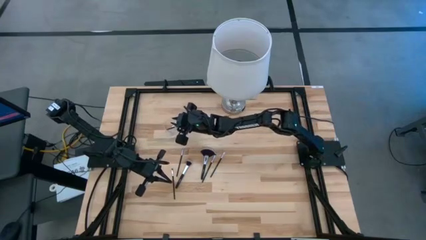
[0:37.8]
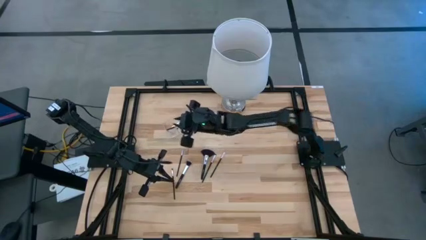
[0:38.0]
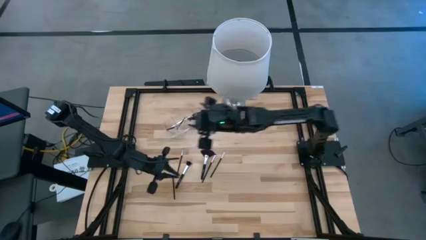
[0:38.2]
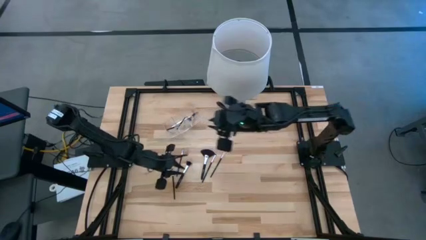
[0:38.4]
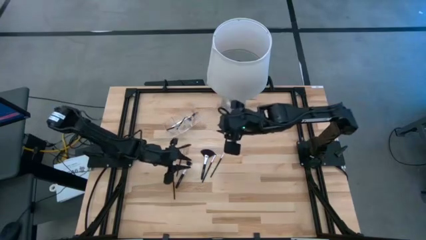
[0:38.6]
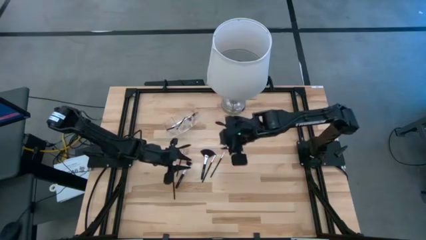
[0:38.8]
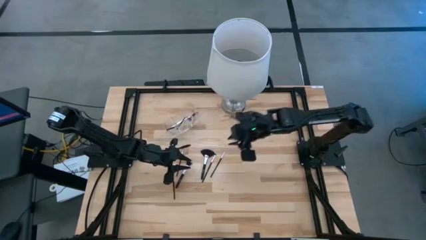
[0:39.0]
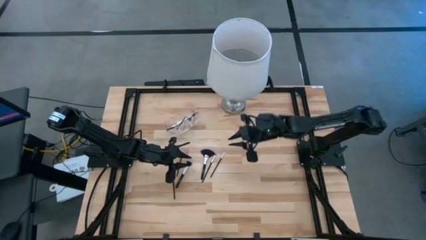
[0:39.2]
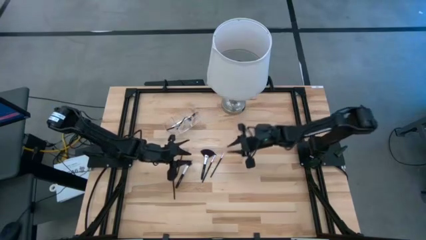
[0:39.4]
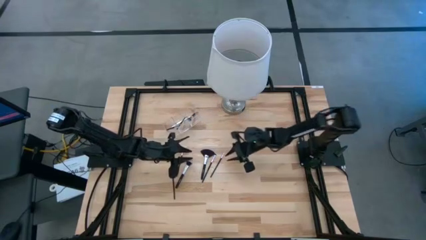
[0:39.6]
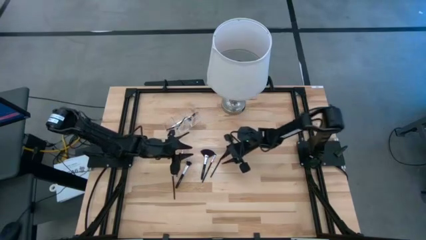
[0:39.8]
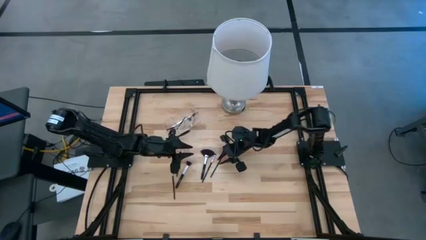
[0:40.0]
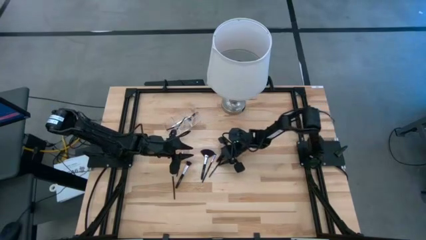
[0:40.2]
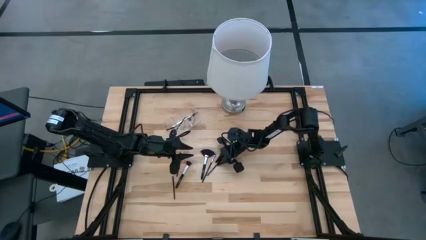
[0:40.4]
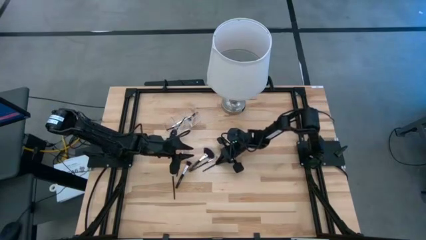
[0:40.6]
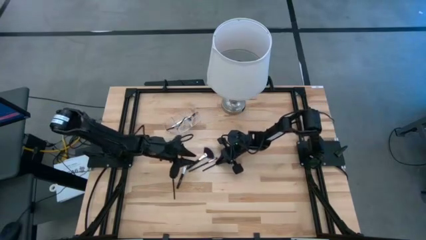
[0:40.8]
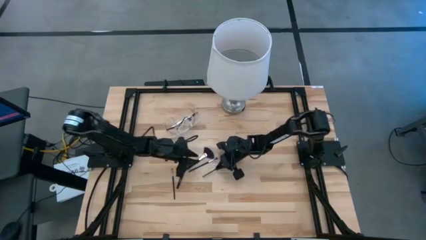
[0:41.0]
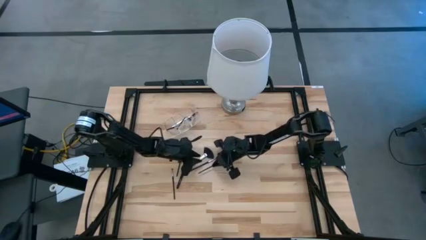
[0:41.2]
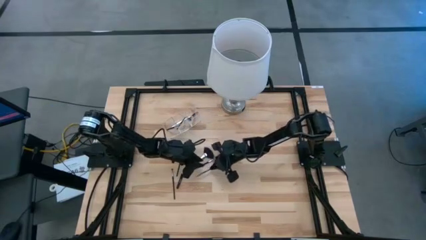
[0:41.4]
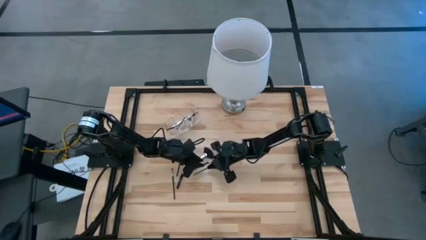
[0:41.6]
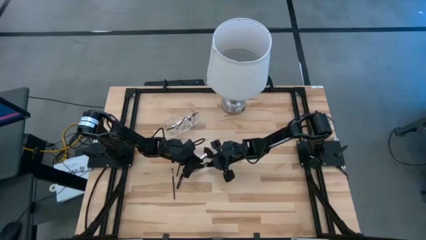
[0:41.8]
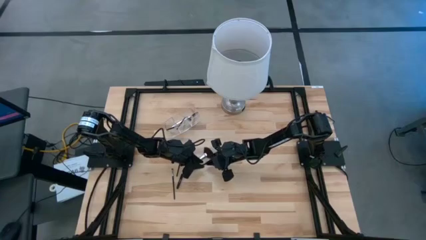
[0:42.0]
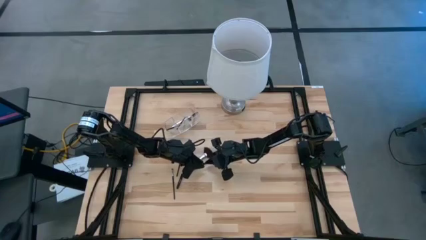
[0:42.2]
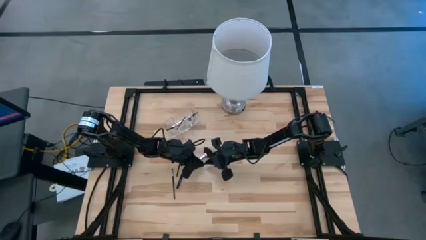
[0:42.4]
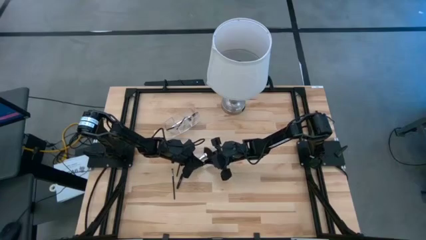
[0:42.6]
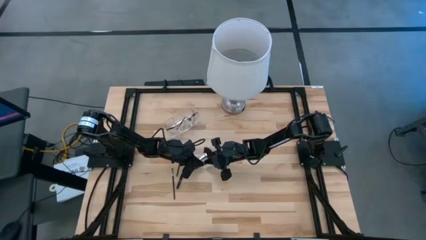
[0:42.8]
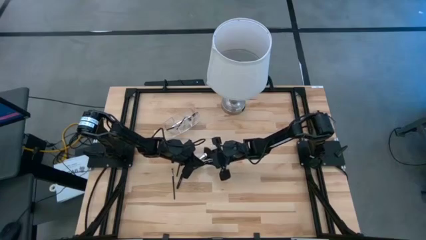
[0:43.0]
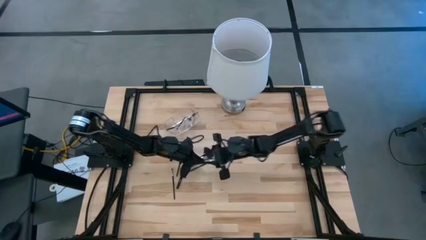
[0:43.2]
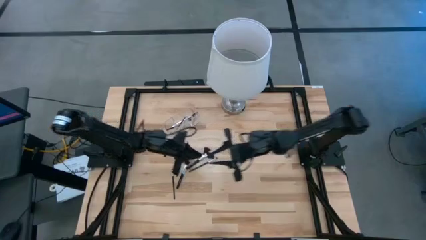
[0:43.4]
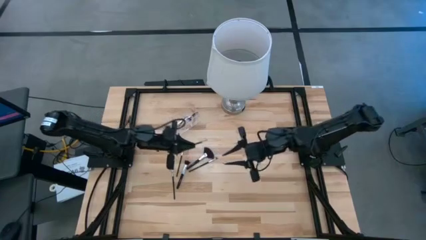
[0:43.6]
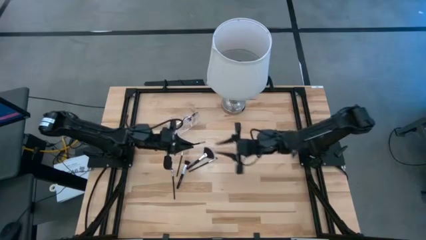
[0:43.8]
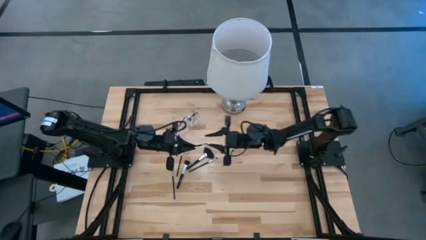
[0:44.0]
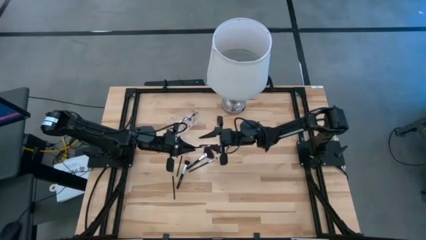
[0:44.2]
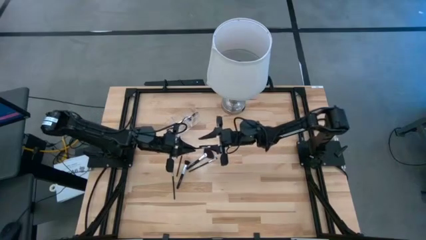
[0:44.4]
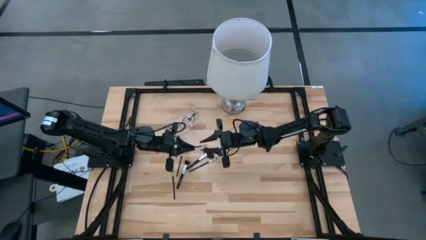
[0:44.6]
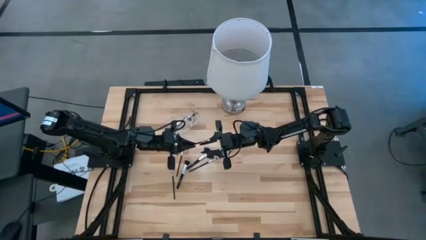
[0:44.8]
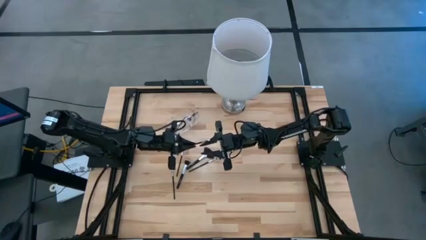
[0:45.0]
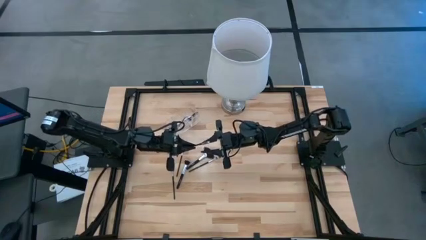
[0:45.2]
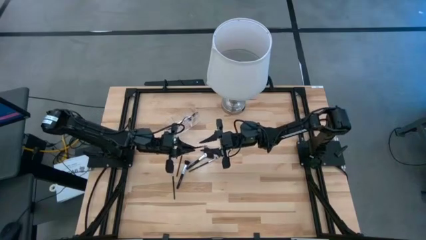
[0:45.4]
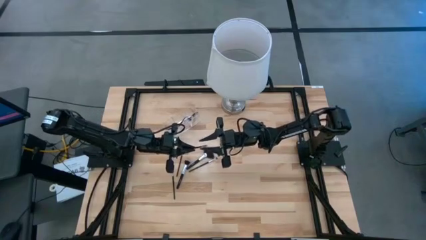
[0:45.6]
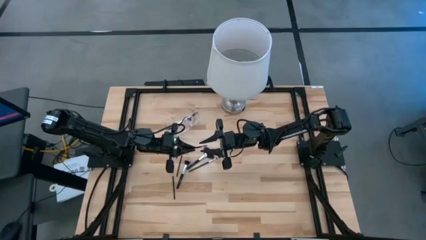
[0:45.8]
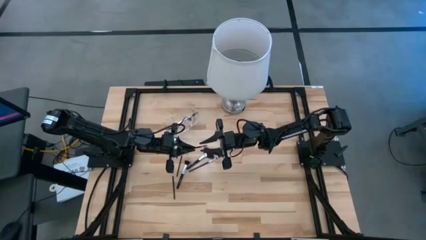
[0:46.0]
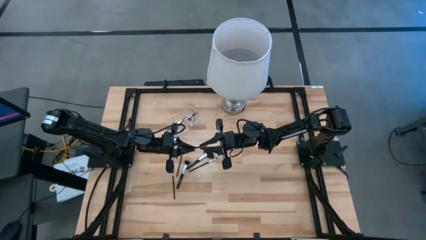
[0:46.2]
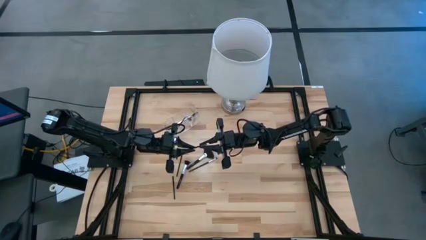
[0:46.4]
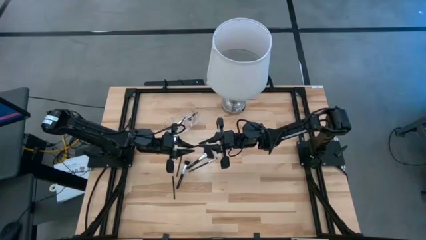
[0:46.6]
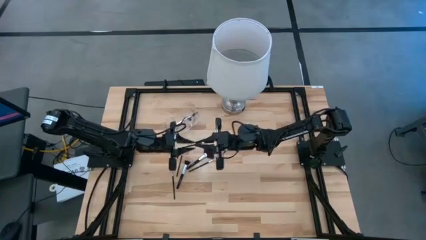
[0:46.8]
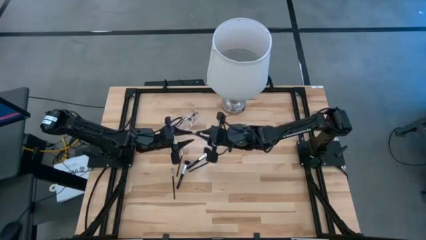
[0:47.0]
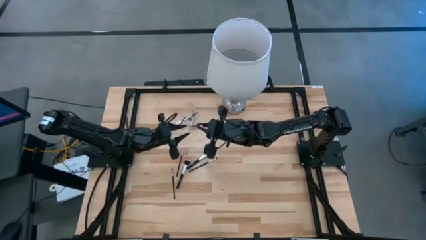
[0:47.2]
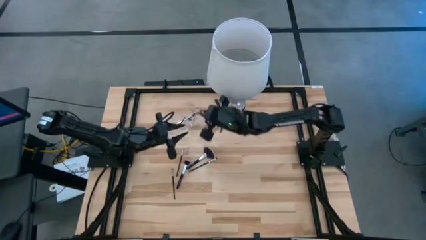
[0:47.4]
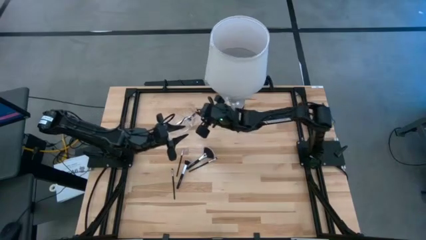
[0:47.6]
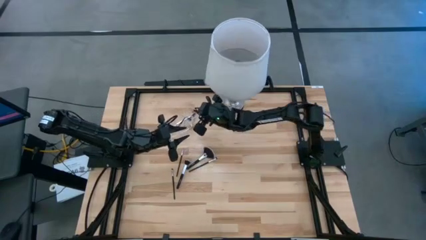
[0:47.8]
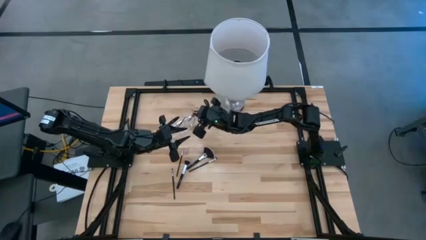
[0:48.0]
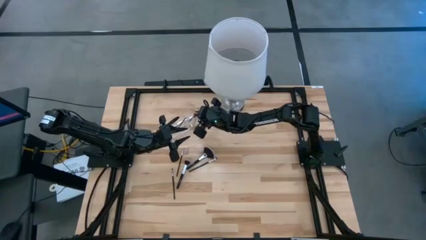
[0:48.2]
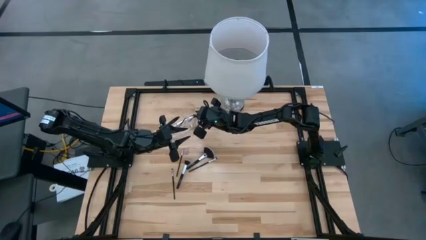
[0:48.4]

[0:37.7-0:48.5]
Task: Put items in baskets/containers
Put the black eyeshadow brush into the transparent organizer
